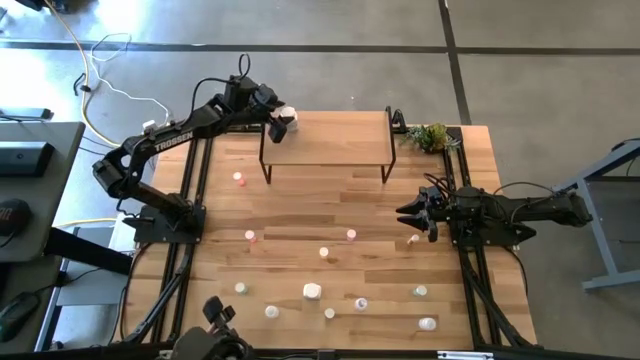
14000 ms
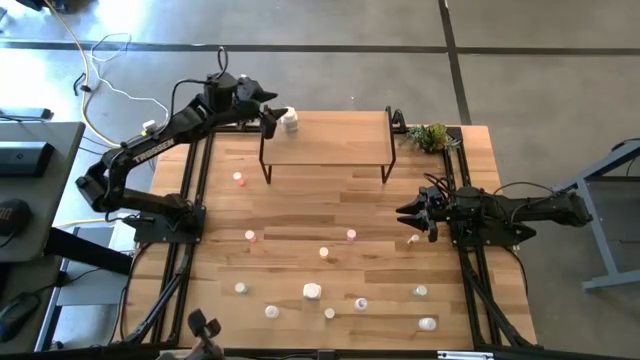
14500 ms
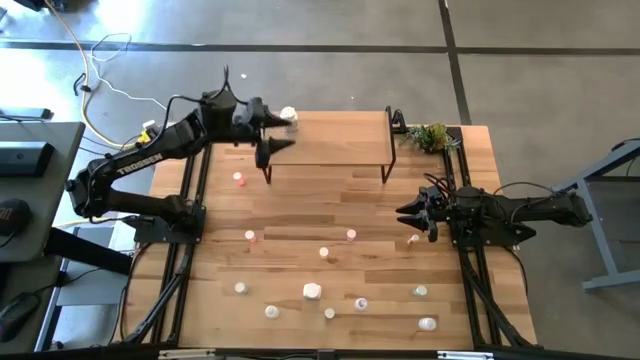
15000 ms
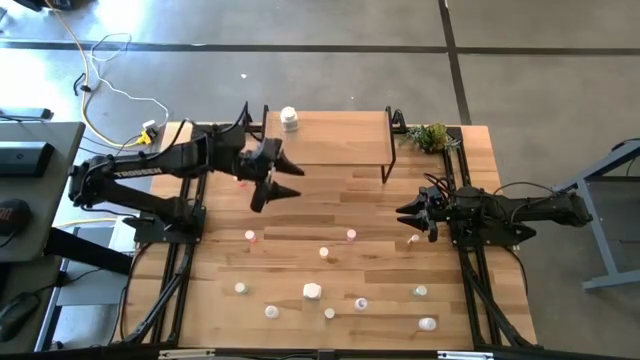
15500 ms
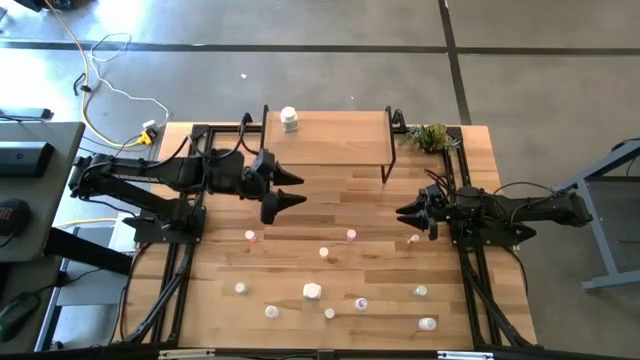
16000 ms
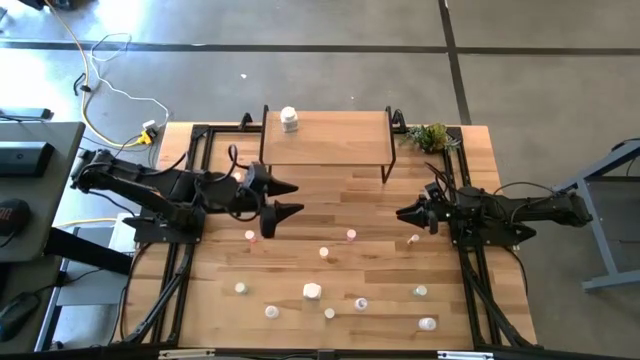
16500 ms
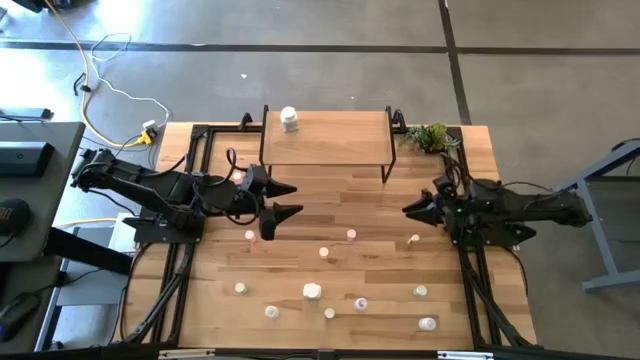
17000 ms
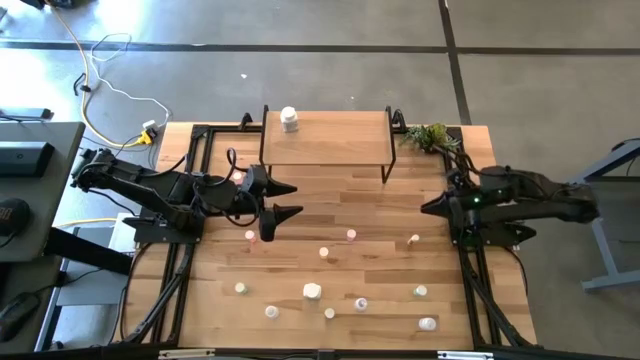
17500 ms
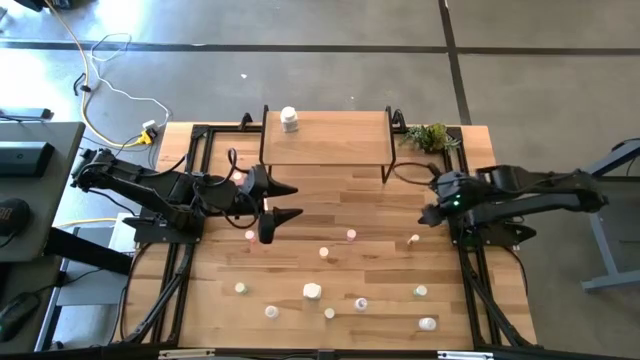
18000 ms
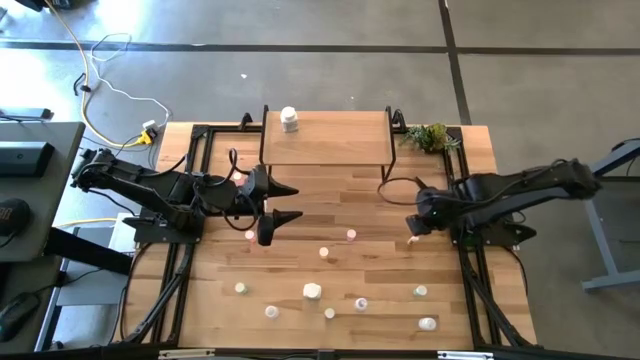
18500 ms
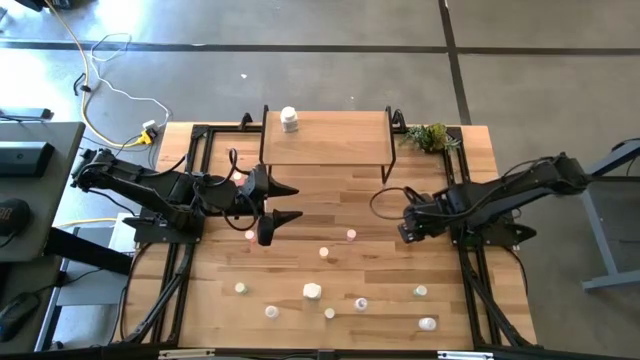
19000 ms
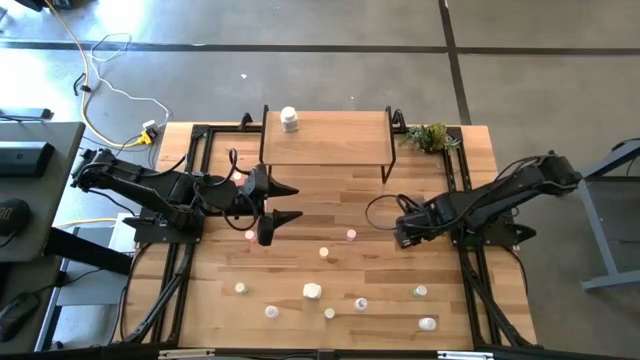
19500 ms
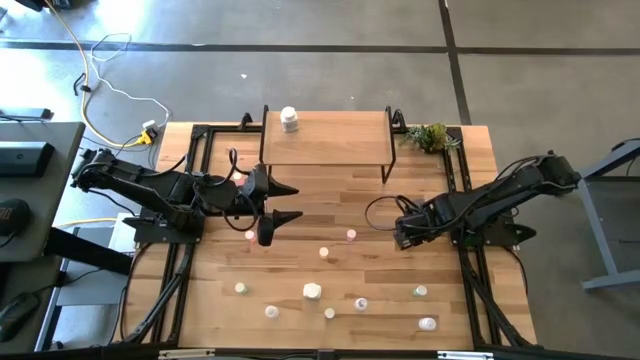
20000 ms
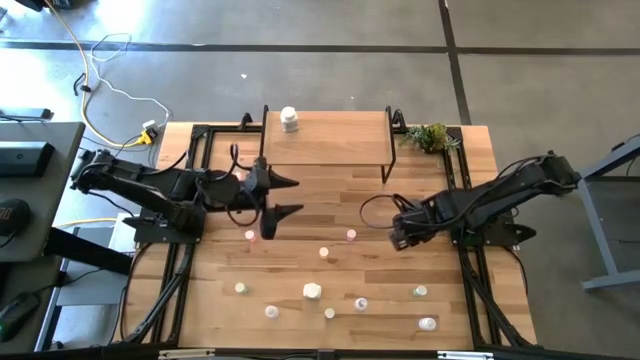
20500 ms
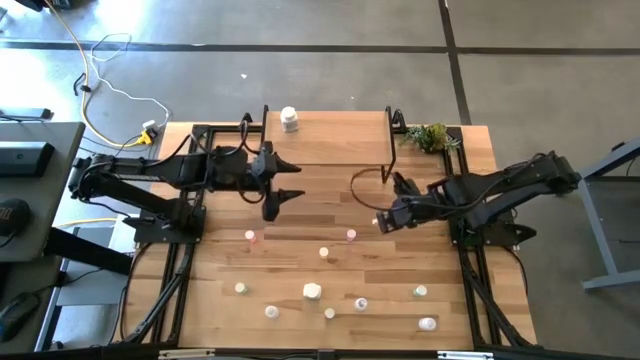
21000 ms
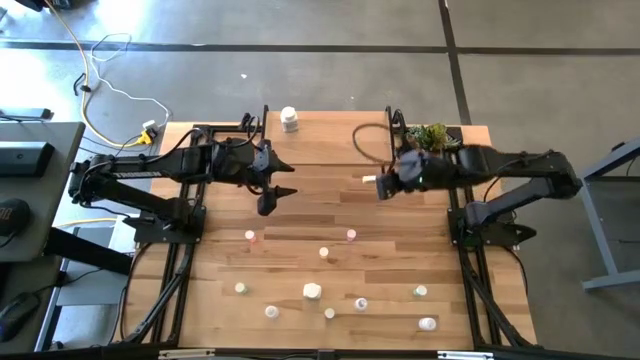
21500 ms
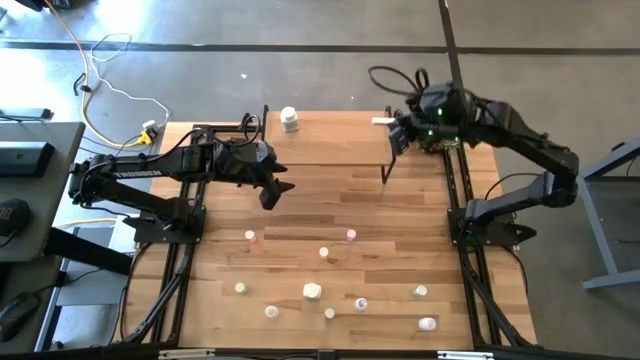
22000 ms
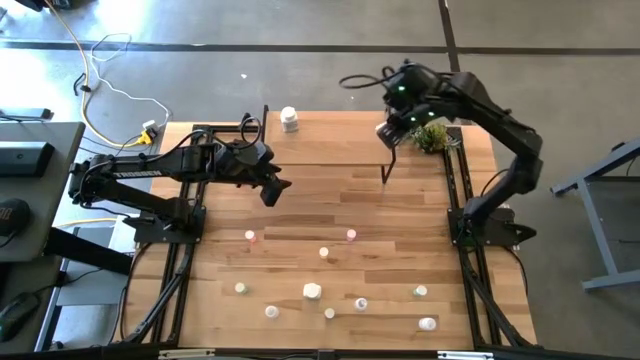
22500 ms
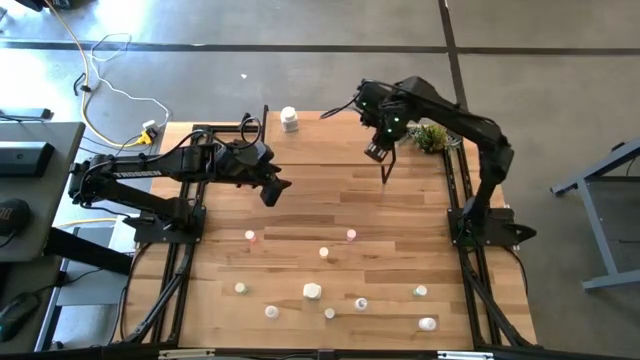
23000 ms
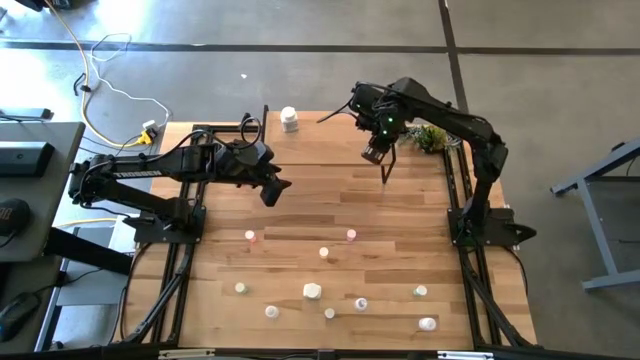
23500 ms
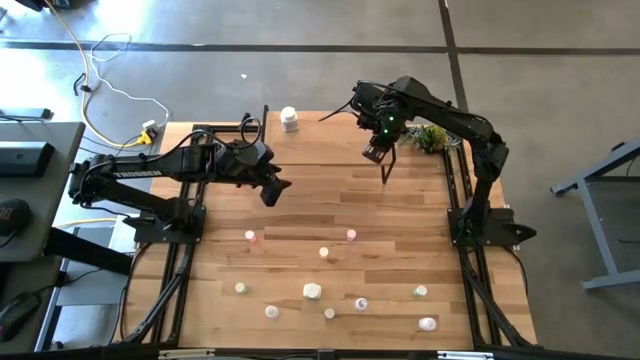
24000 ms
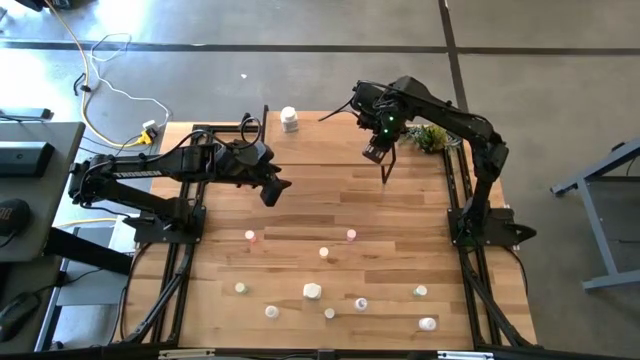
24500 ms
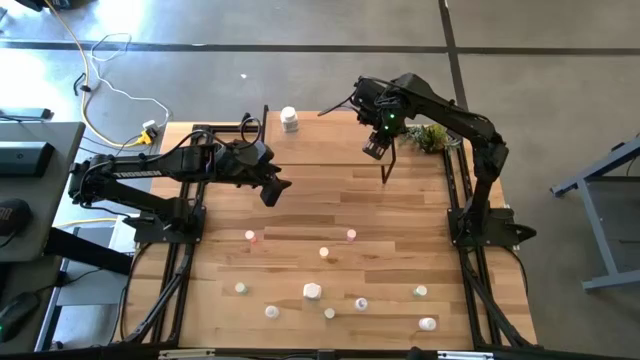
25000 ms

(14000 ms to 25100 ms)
Task: Pick and place medicine bottles onto shelf by color
Put the white yellow pill bottle on the shelf

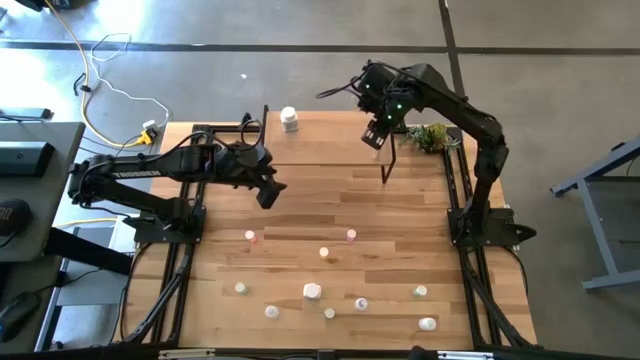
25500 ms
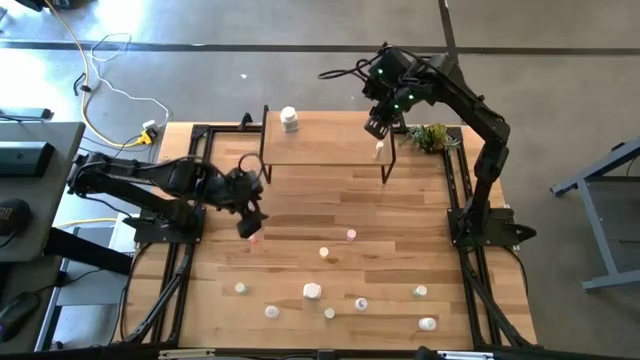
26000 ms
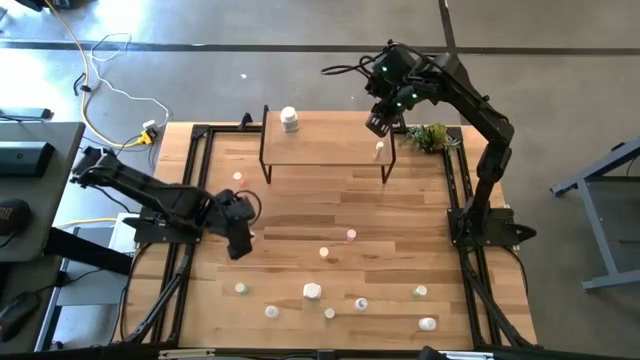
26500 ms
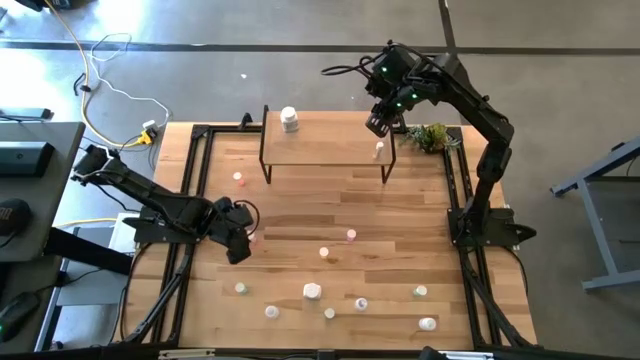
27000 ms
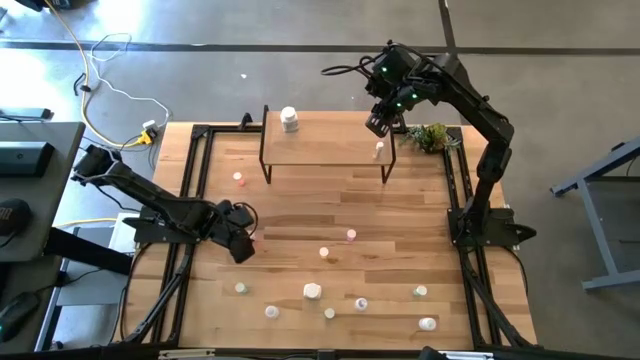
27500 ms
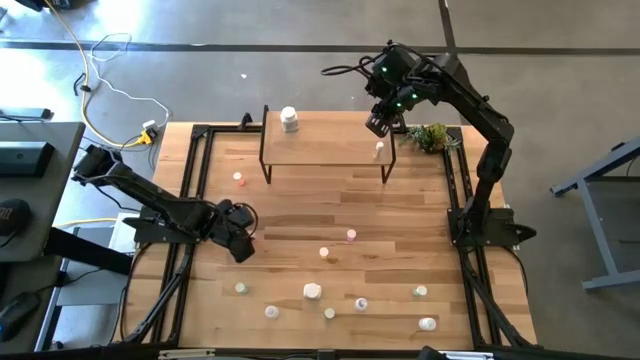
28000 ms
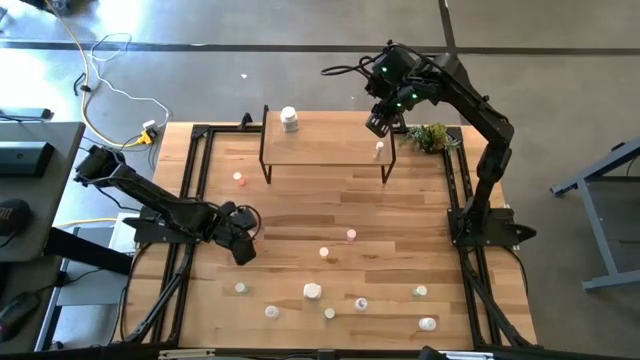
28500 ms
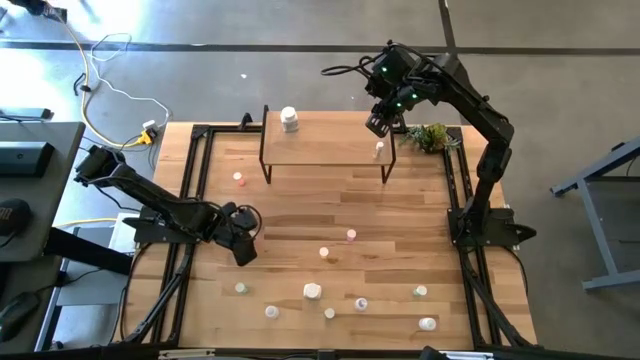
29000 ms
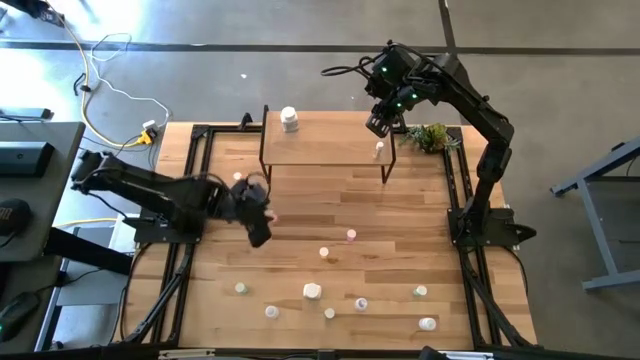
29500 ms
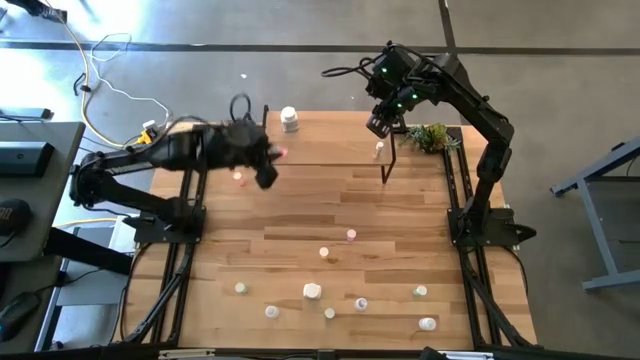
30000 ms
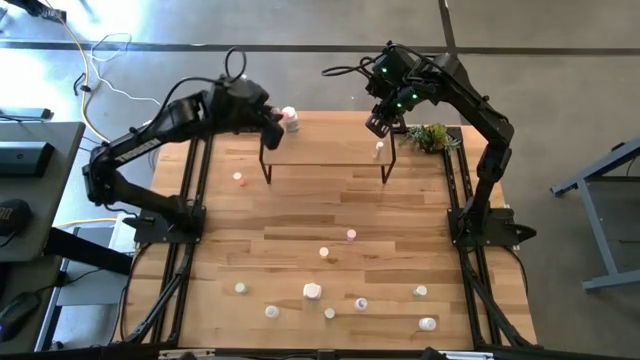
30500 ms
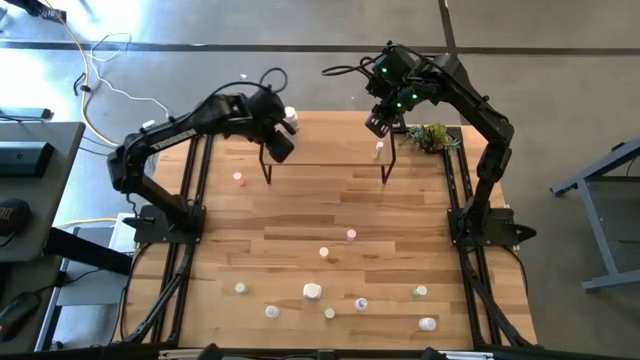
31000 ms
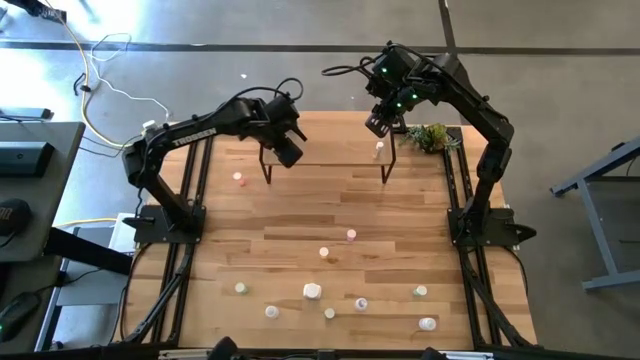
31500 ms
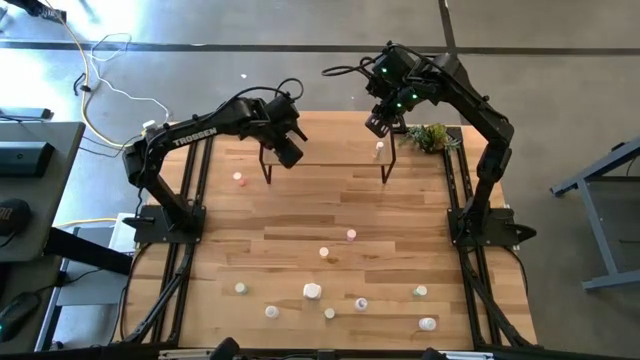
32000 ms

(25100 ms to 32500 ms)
Put the bottom pink pill bottle on the shelf

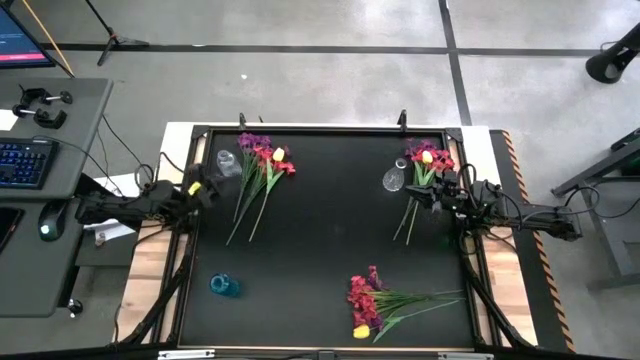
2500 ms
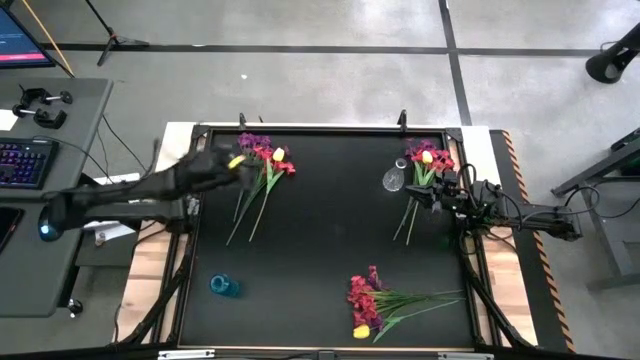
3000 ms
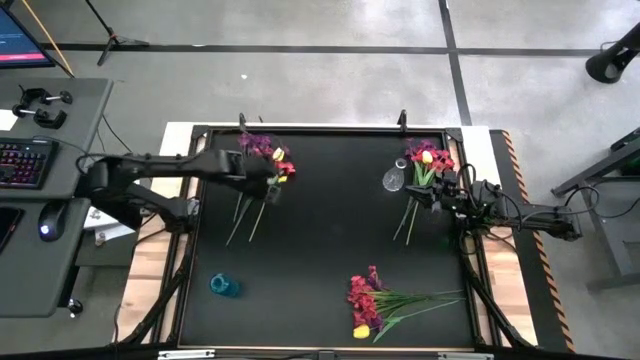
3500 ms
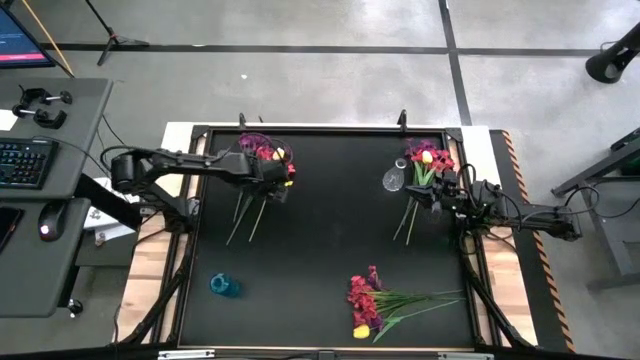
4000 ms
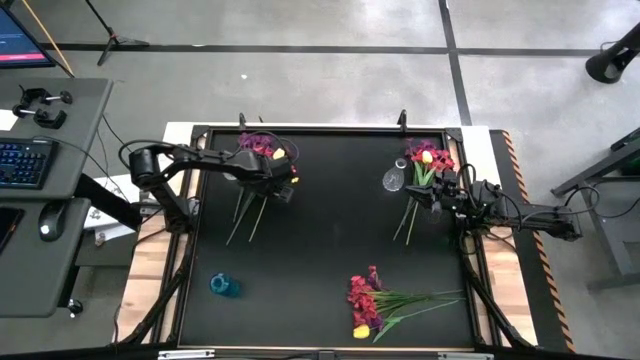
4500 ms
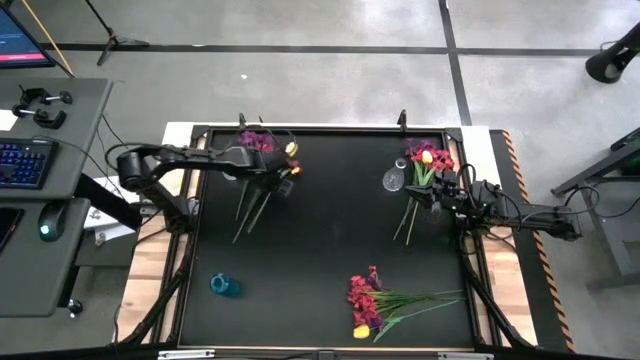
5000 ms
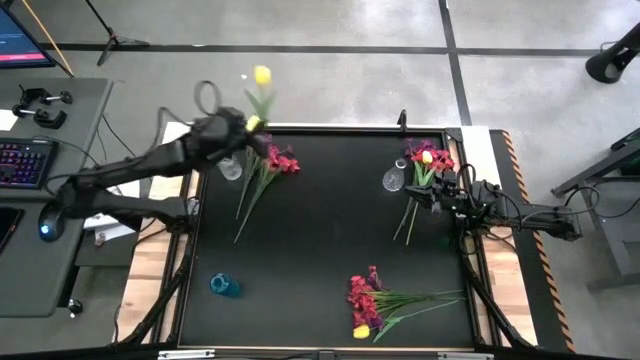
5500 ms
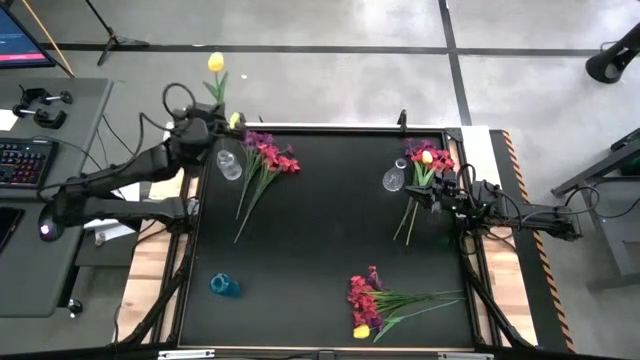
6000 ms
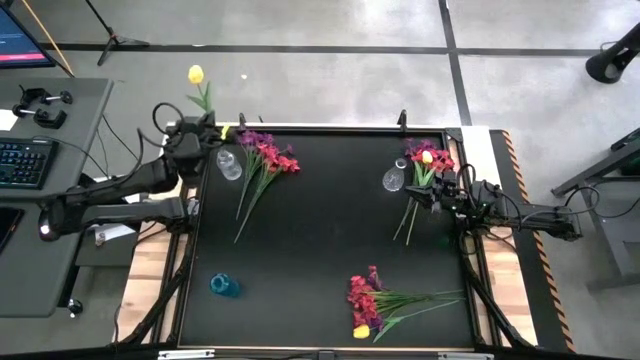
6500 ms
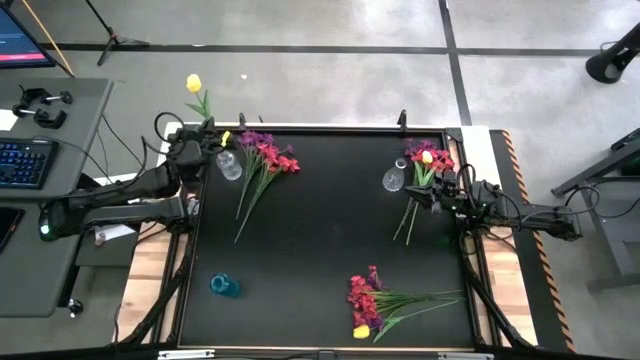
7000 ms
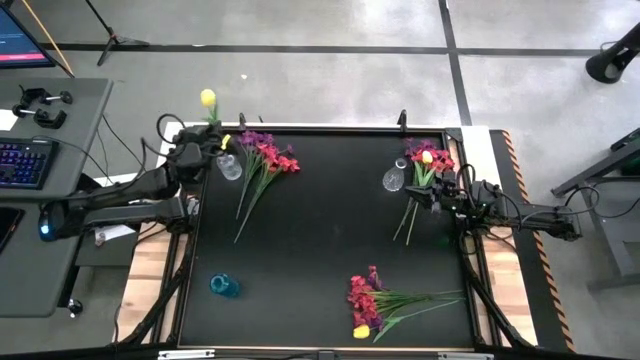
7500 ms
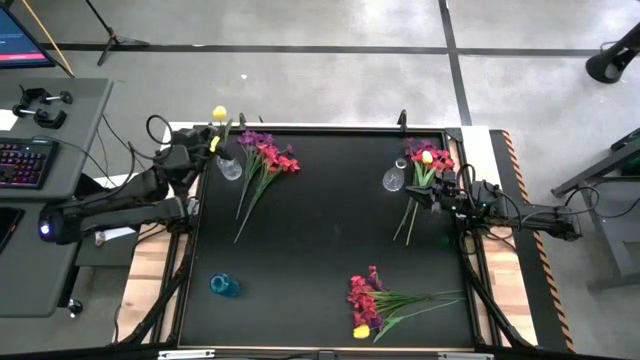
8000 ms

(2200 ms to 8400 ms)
Task: Sort flowers into vase by color
Put the top left yellow flower into the left transparent vase
